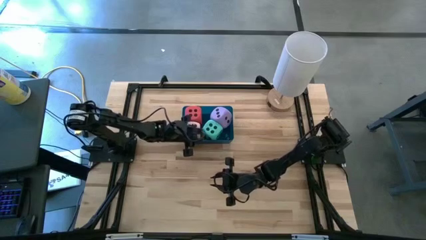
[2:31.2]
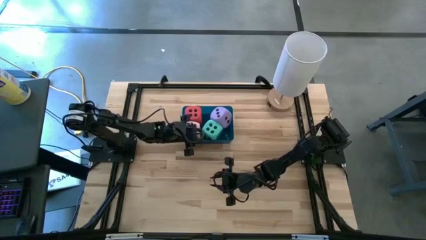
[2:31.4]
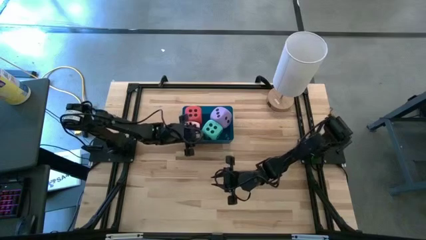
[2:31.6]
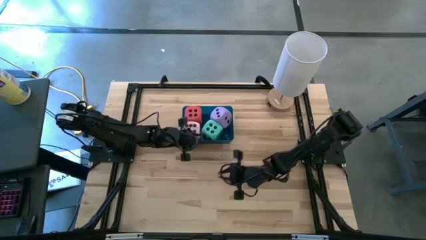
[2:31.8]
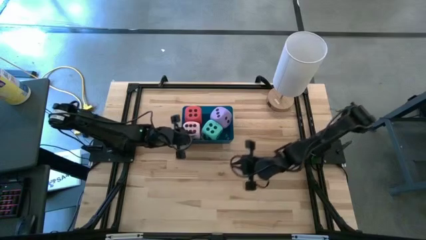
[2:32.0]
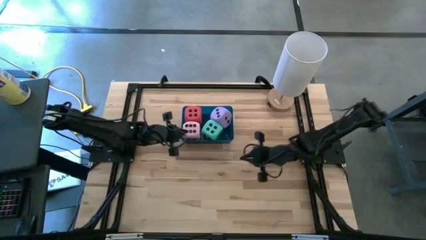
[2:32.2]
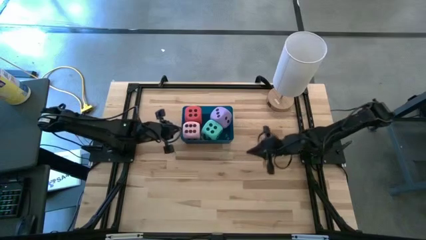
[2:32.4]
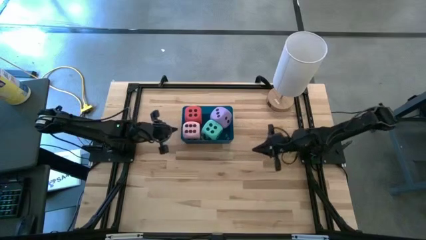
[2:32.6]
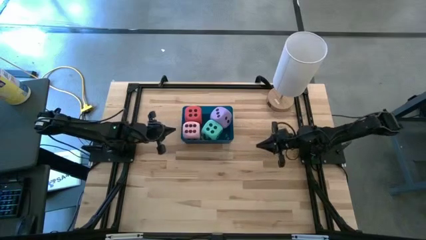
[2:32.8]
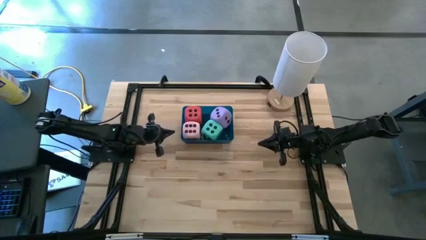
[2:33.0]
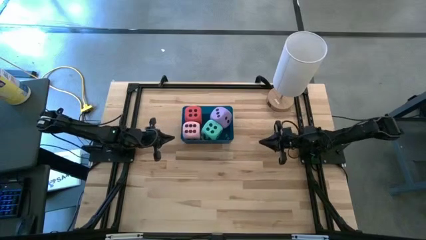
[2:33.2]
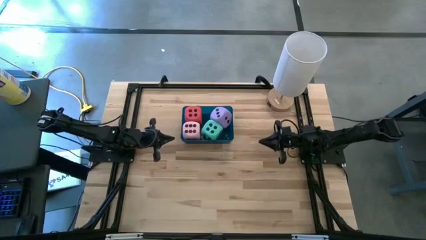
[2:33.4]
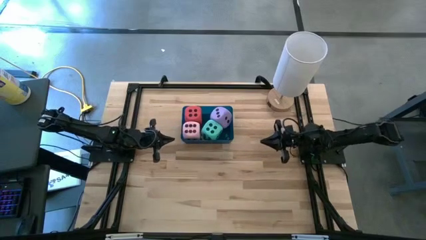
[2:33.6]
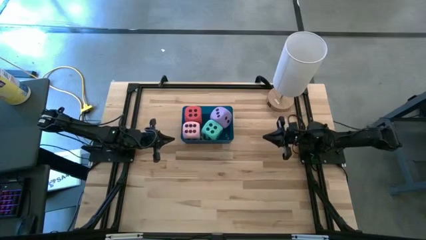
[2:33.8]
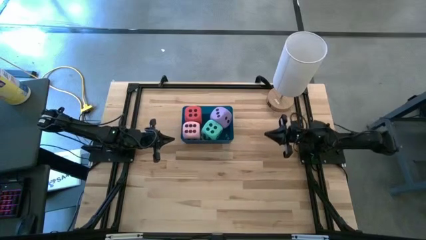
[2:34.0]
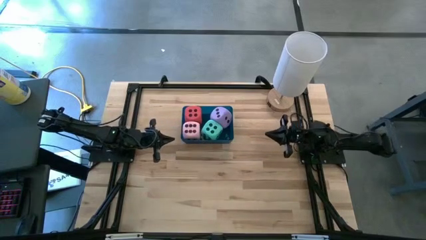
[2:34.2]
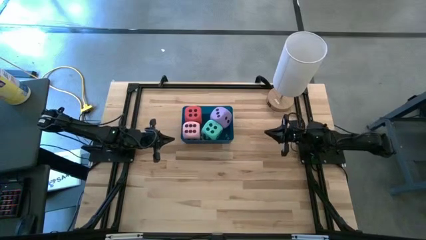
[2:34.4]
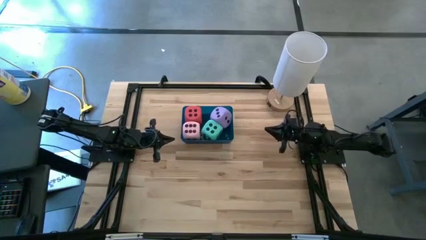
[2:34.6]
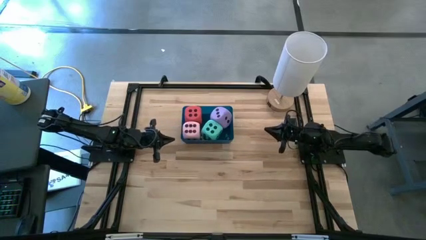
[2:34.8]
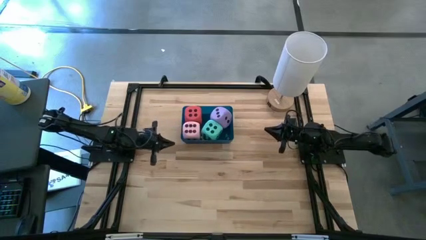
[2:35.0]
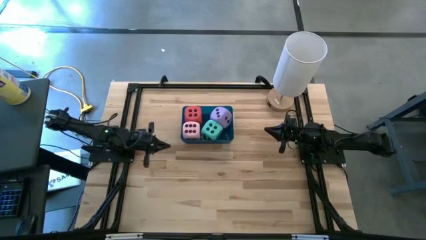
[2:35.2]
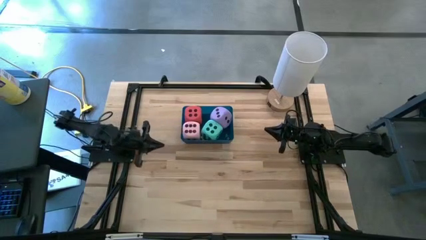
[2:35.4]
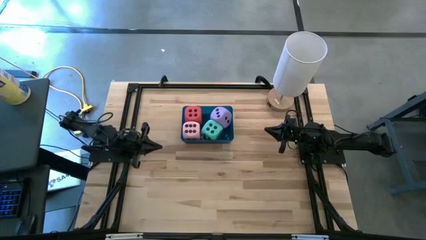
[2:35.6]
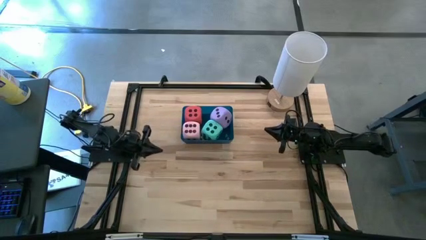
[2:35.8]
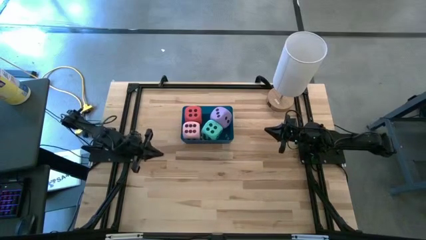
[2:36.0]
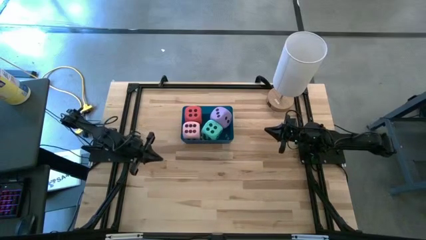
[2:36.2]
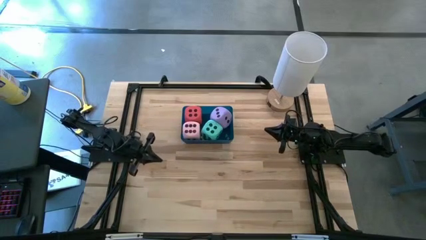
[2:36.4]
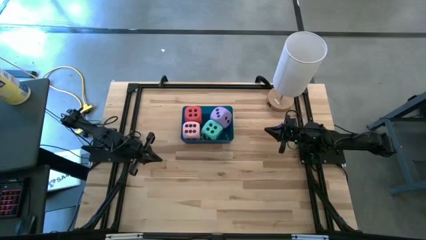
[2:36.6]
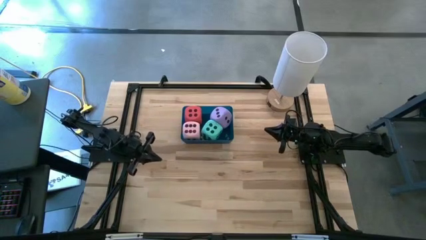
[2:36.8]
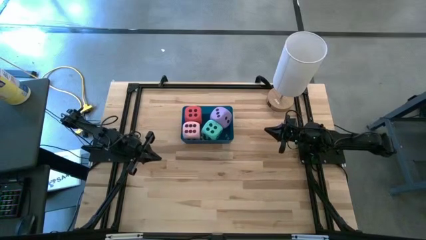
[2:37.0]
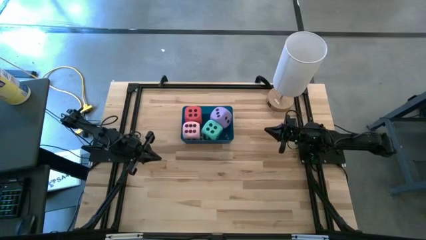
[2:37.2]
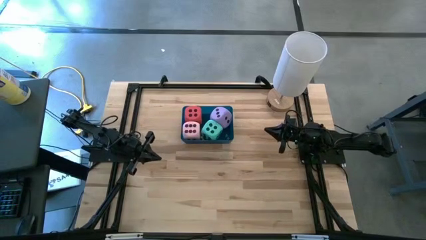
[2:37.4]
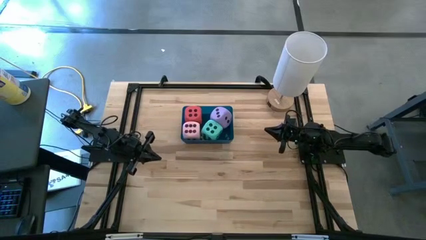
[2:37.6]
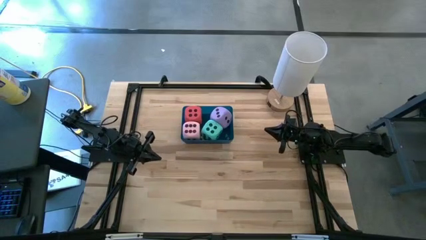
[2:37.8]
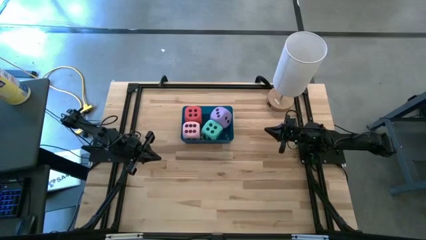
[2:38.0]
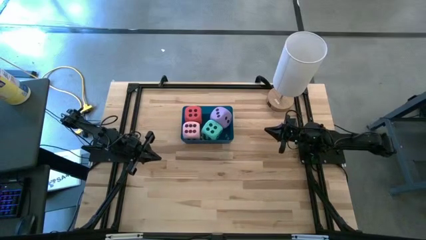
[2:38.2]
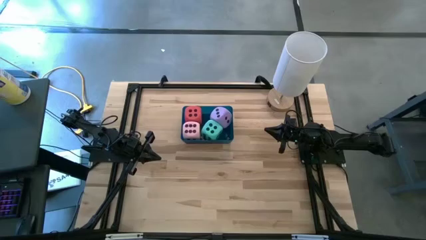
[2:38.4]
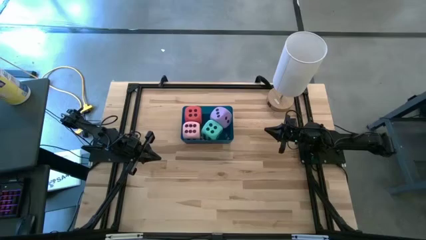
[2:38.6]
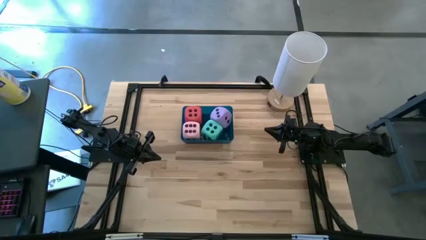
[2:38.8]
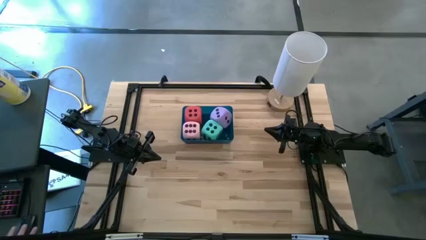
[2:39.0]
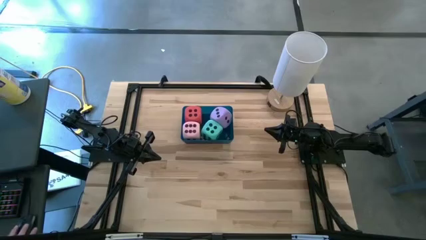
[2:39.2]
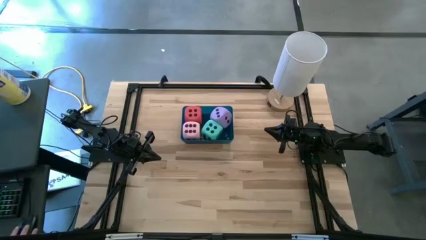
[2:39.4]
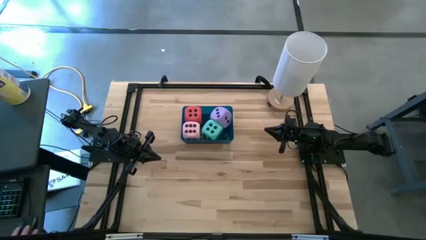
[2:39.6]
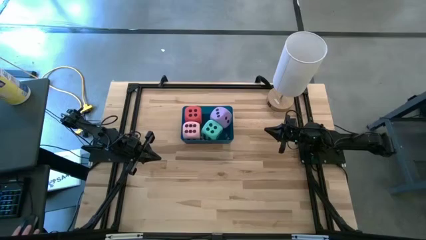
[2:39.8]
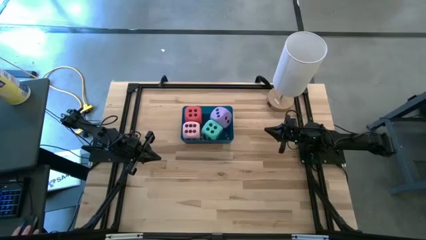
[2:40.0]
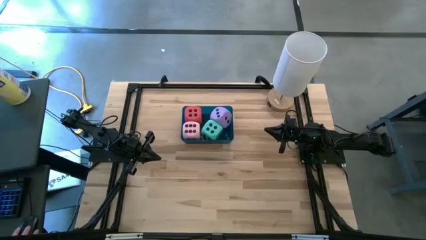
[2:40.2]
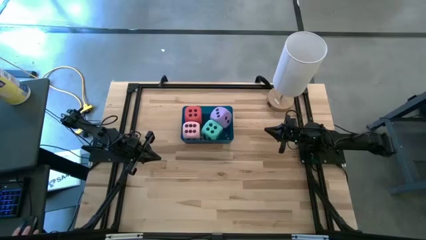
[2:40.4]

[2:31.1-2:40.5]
Task: Pick & Place Dice
Return to Home Position

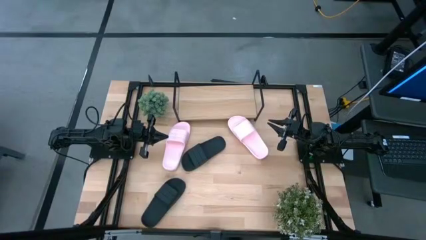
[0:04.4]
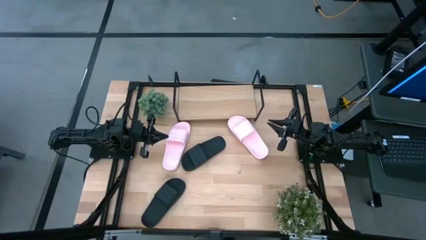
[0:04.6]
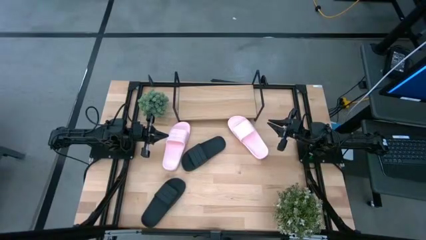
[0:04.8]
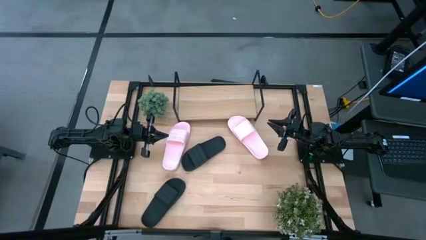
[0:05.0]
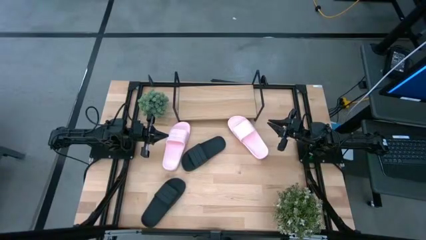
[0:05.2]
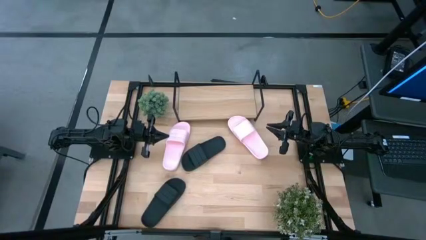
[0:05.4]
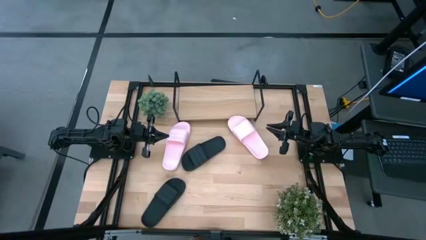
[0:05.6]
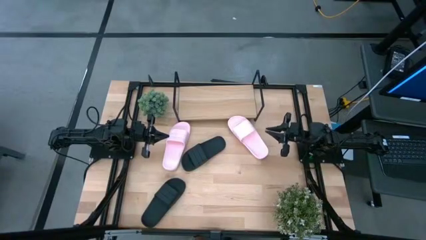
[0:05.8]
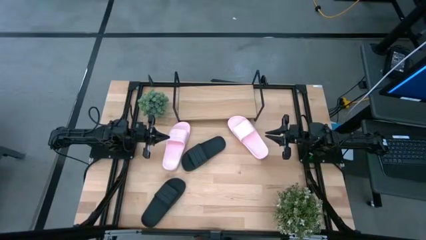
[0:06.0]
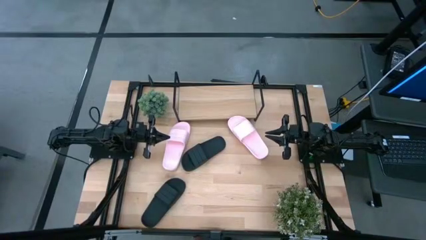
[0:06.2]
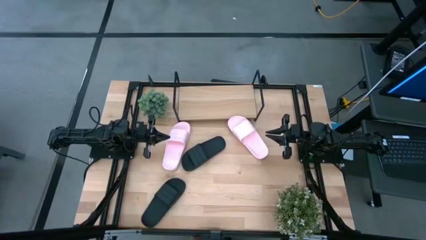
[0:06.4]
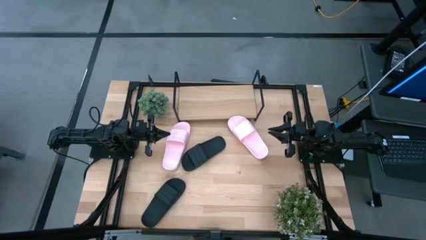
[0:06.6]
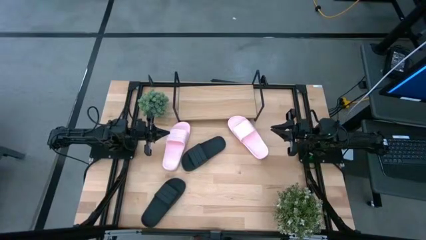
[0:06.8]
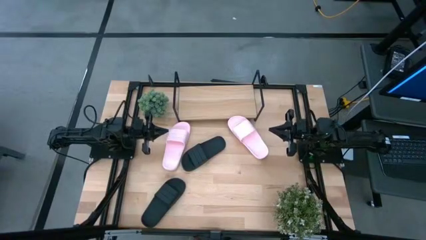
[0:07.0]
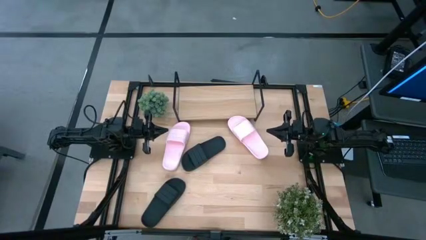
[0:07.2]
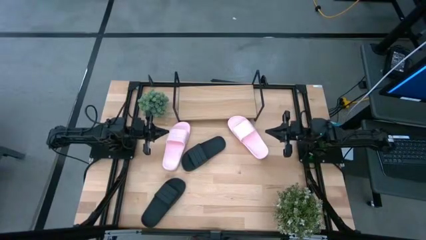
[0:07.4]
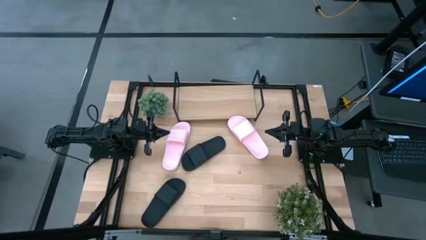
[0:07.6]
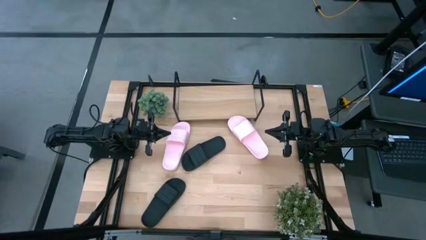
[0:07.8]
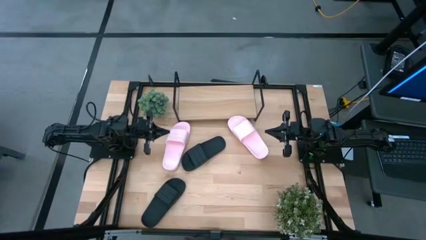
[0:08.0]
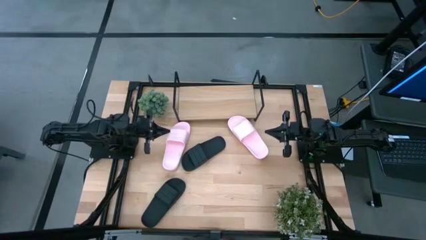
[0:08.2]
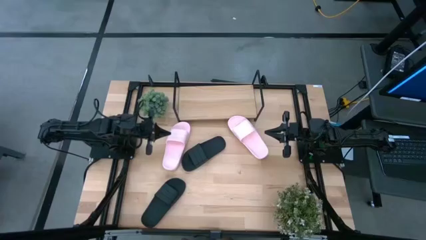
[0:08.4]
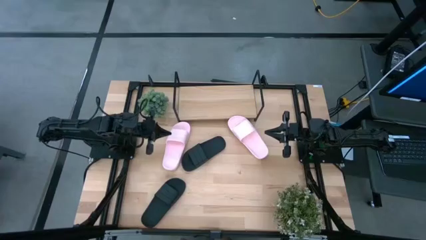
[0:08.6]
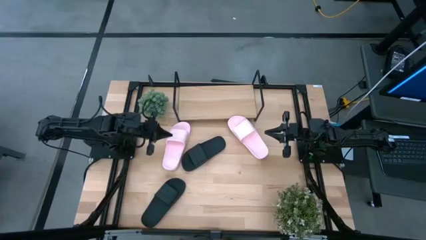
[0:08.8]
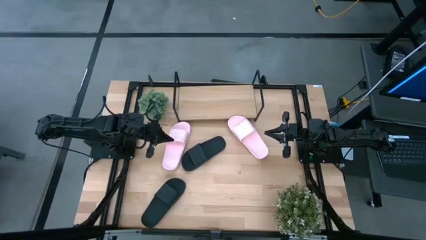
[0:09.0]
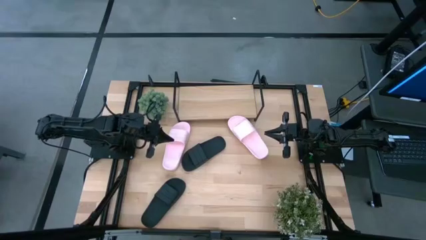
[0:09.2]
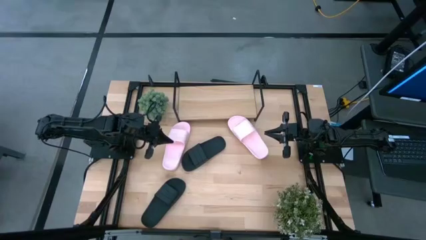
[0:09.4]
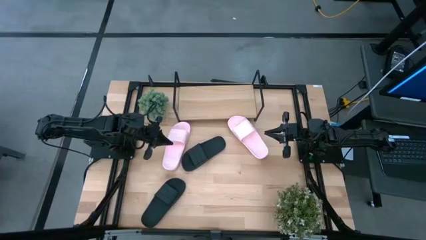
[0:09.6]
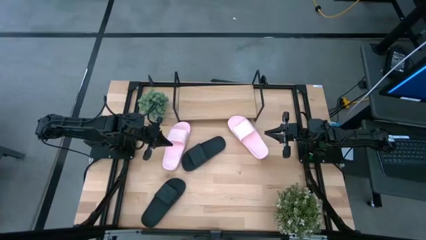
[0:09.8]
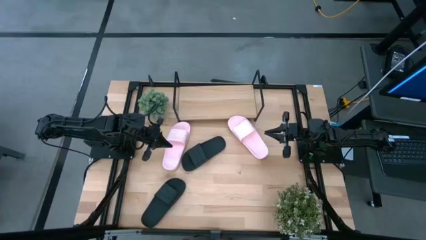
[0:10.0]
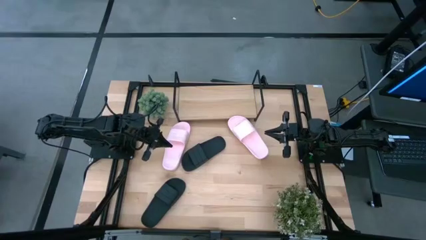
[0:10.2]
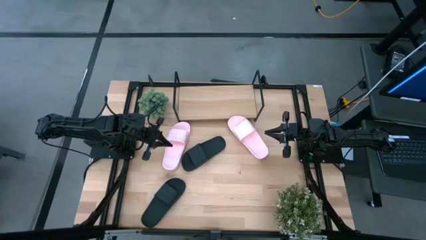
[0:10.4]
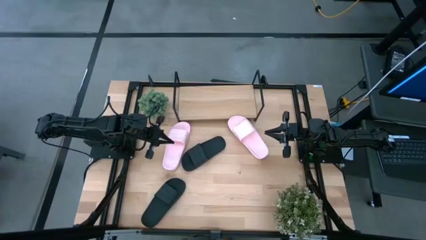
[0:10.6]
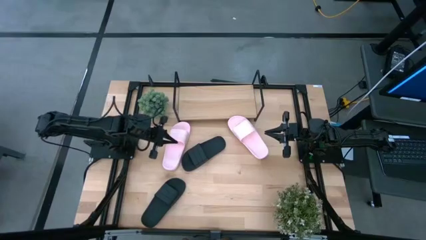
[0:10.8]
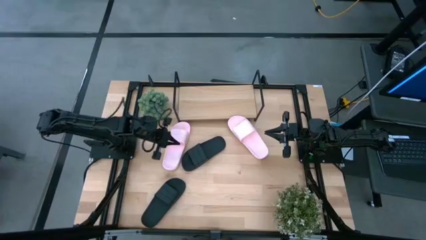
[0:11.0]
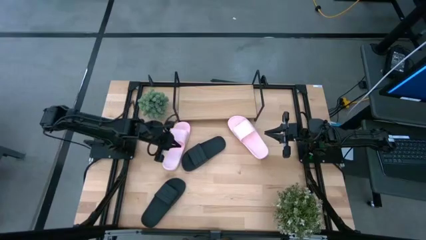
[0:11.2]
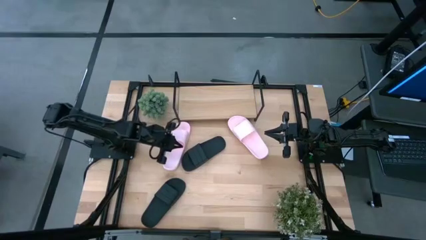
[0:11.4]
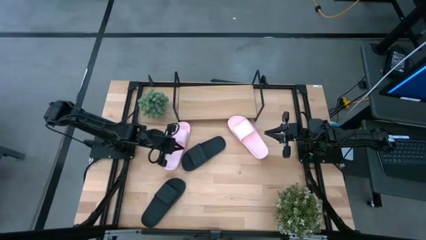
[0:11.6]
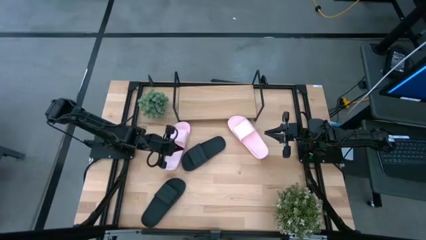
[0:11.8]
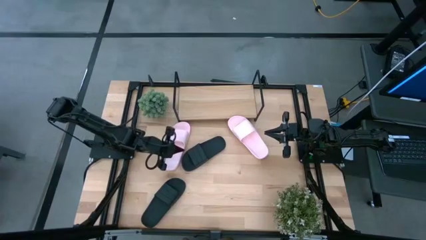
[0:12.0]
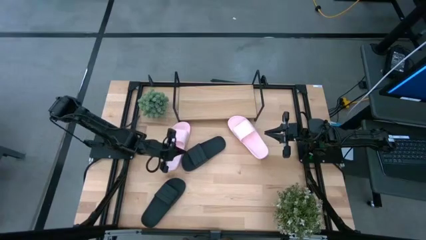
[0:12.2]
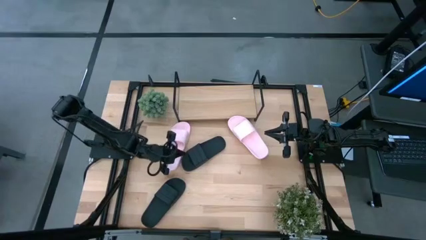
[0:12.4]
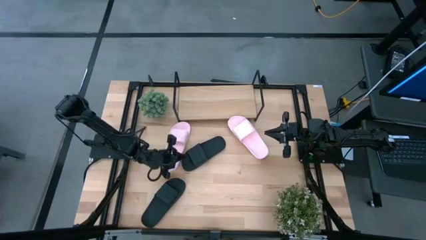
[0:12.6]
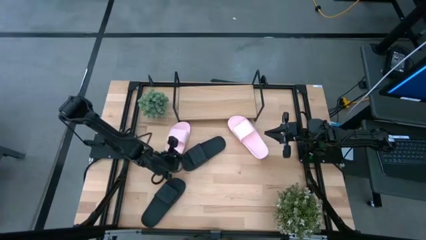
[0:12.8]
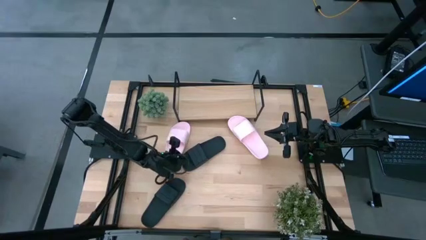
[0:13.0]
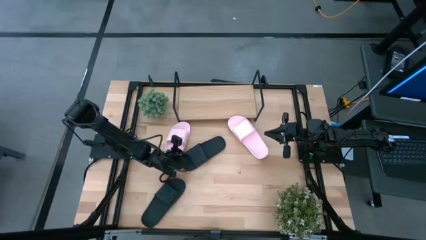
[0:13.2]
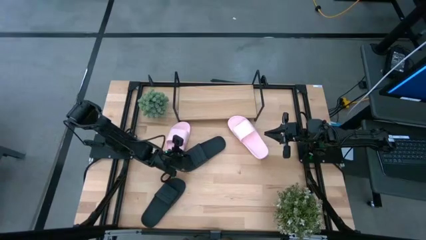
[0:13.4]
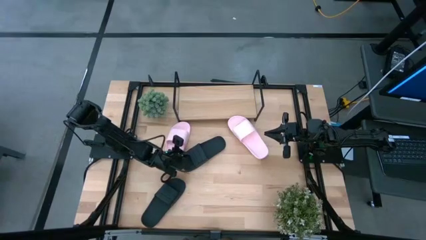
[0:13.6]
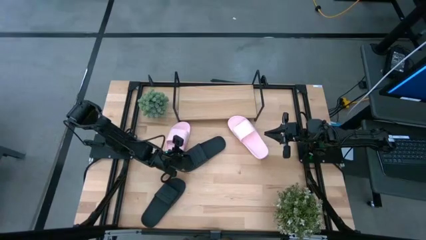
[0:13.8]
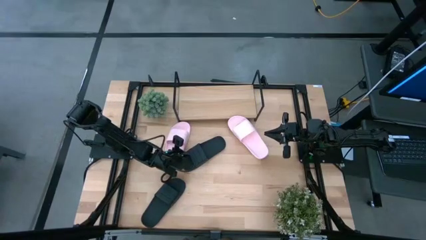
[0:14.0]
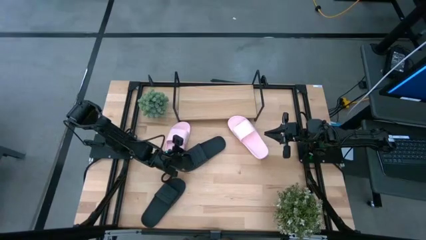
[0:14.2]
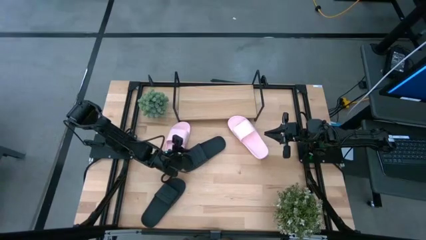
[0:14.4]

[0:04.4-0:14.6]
Task: Pick and place slides into the shelf
Put the top black slide on the shelf
